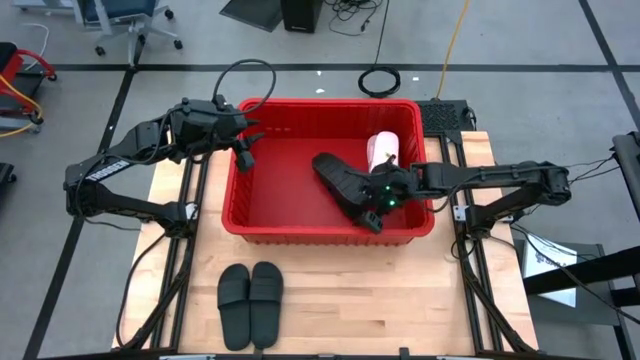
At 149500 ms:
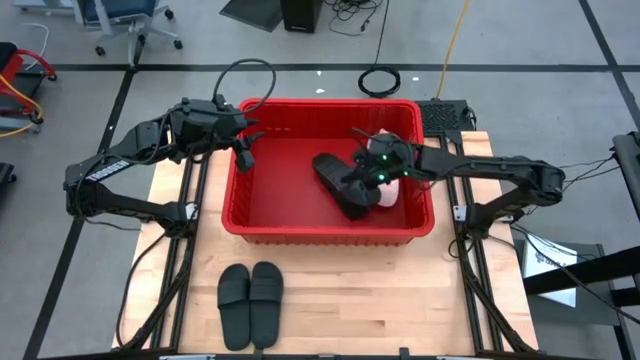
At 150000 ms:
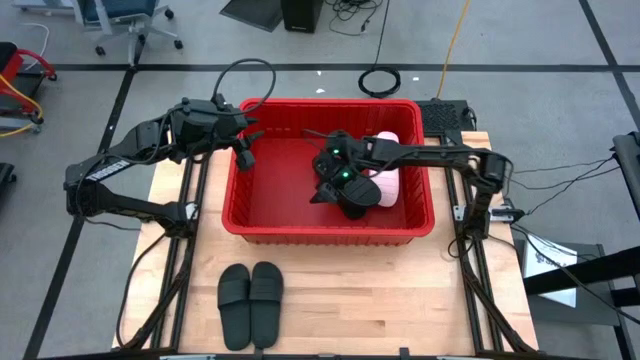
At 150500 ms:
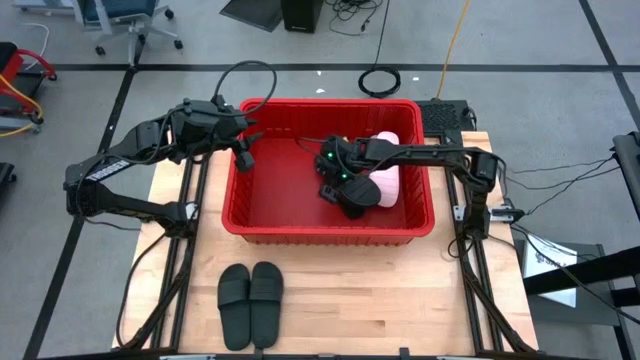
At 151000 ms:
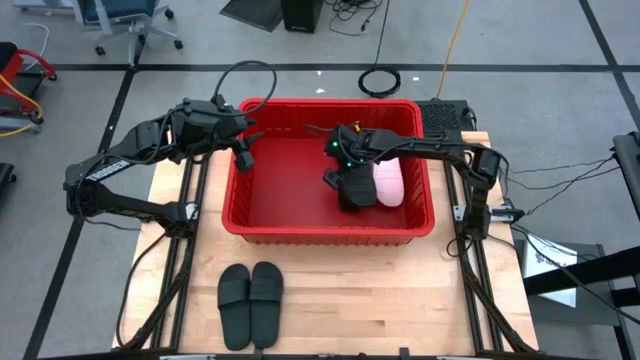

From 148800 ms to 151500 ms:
Task: Pick and place slides into bin
Adjust the stacked black slides in the red bin

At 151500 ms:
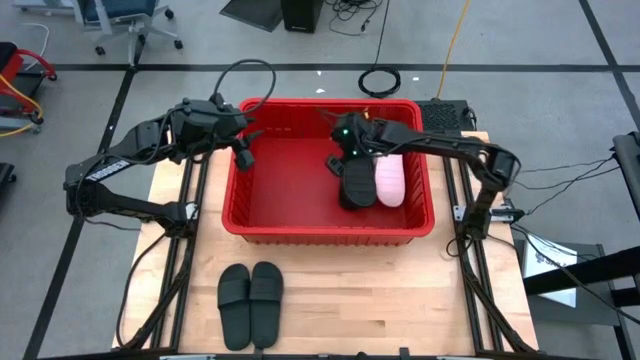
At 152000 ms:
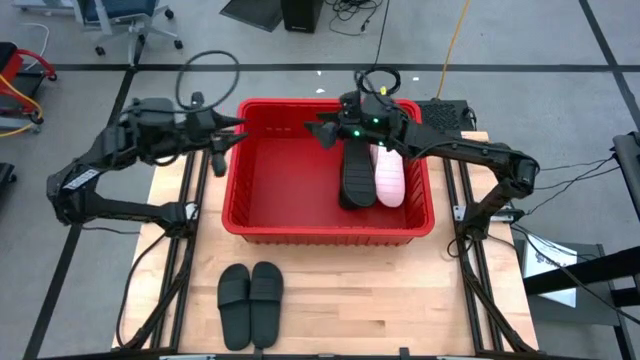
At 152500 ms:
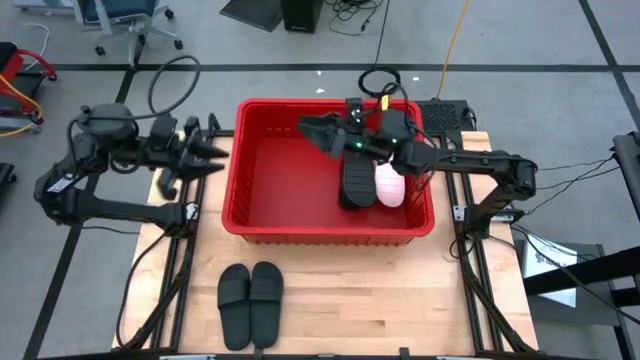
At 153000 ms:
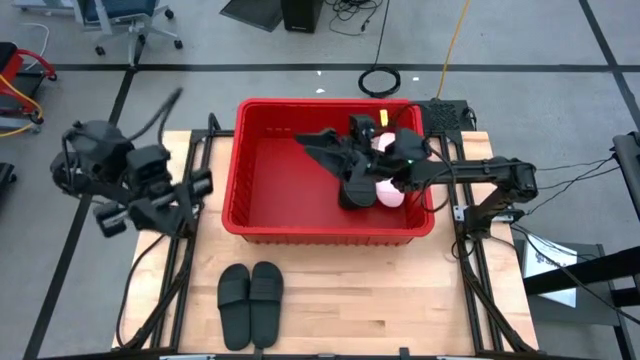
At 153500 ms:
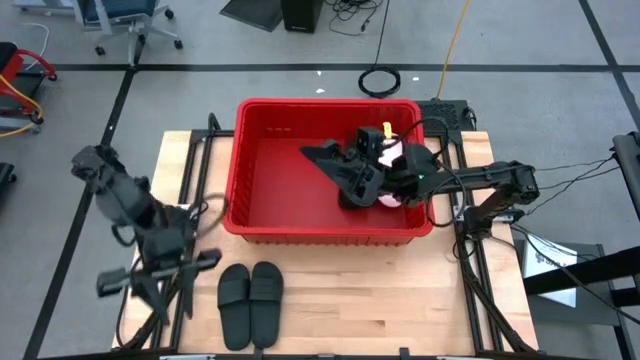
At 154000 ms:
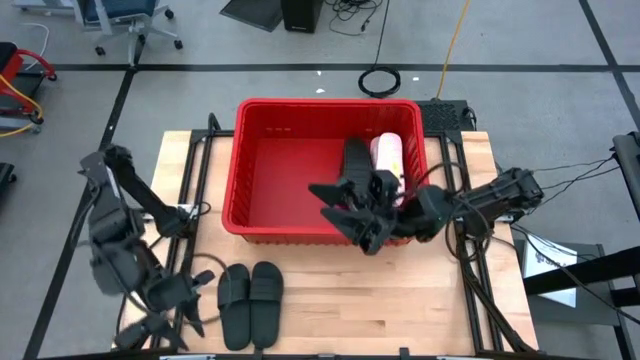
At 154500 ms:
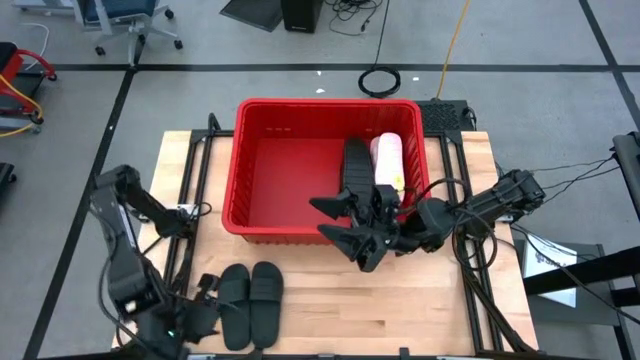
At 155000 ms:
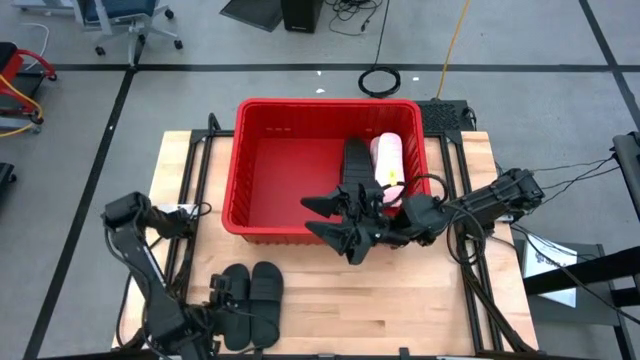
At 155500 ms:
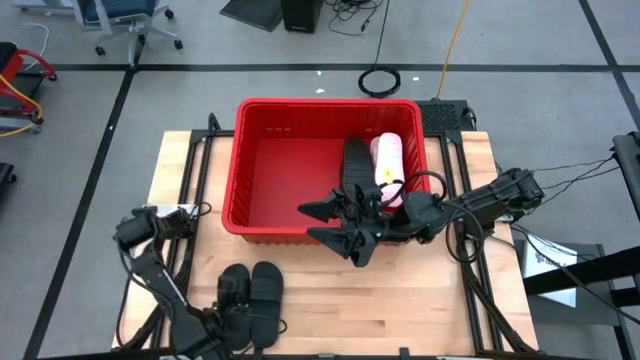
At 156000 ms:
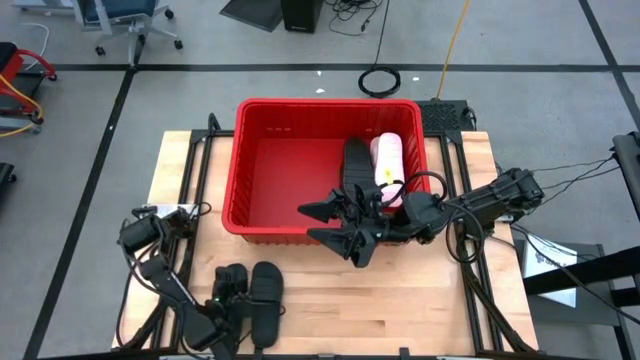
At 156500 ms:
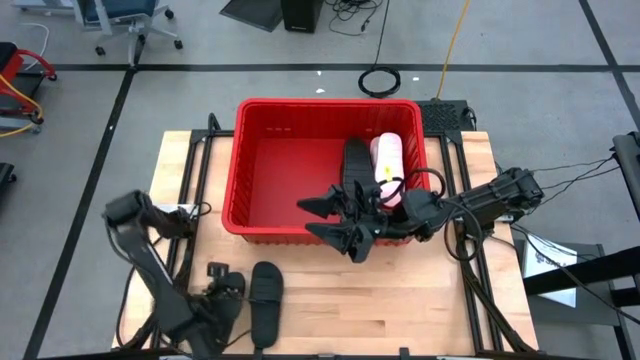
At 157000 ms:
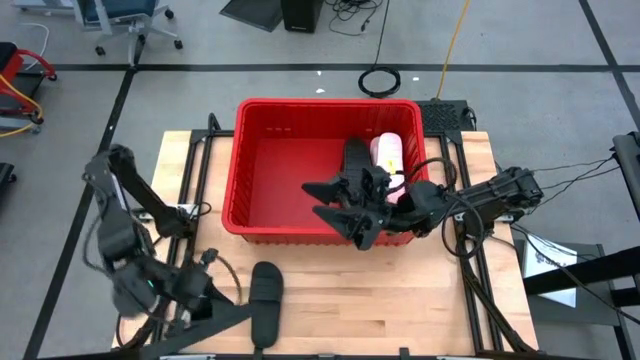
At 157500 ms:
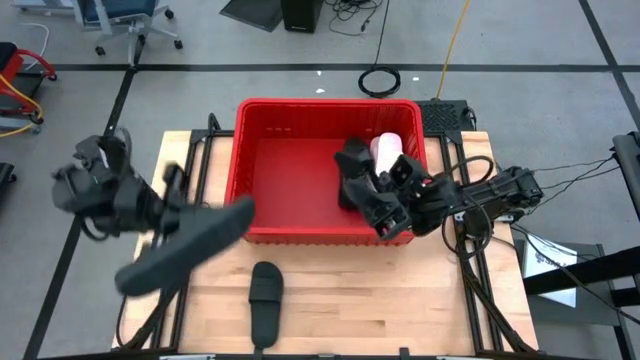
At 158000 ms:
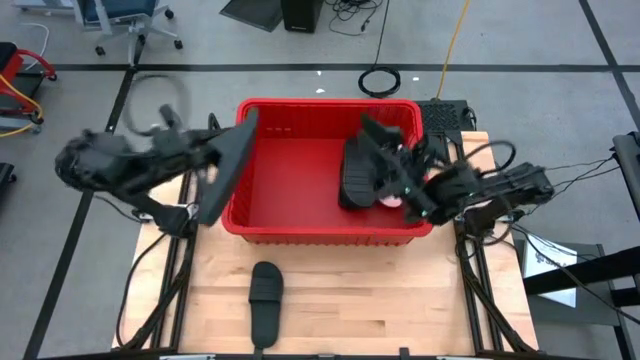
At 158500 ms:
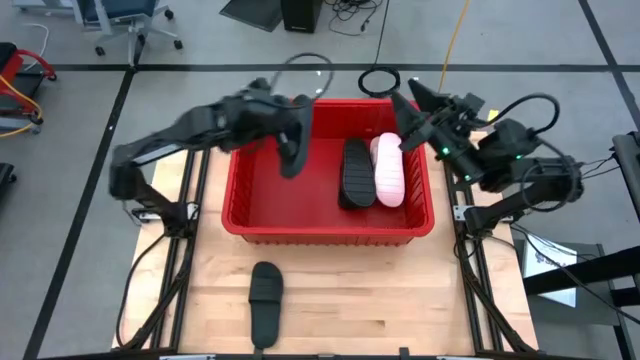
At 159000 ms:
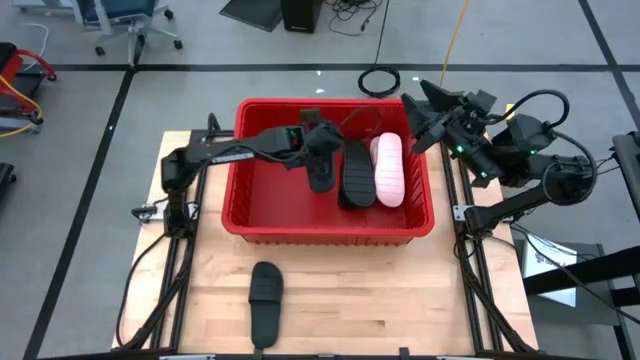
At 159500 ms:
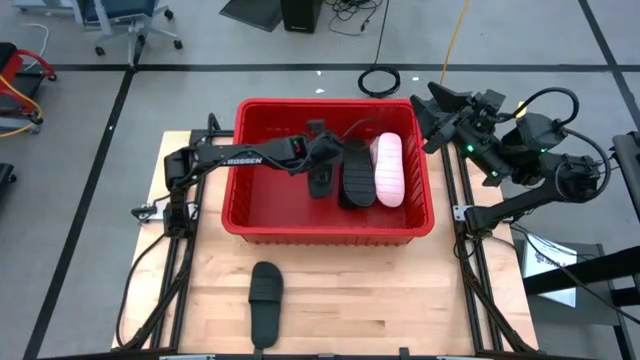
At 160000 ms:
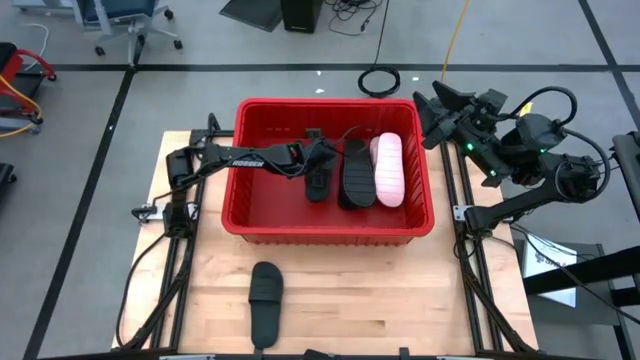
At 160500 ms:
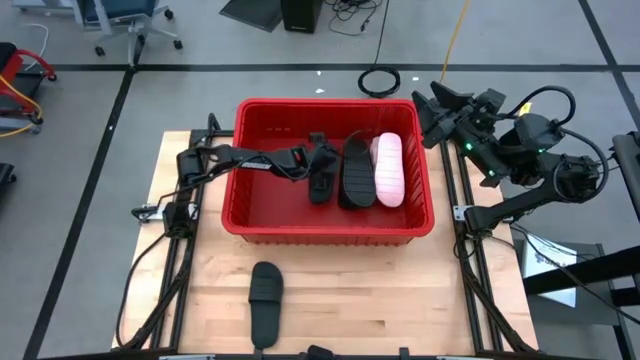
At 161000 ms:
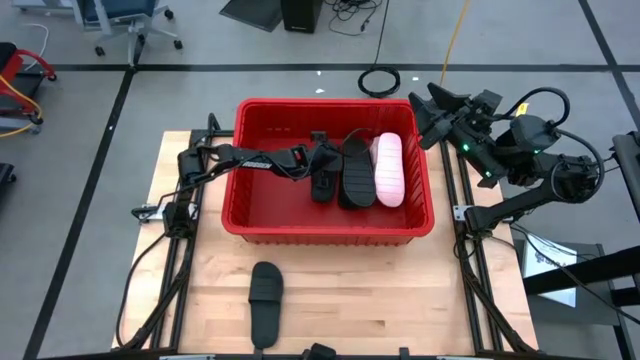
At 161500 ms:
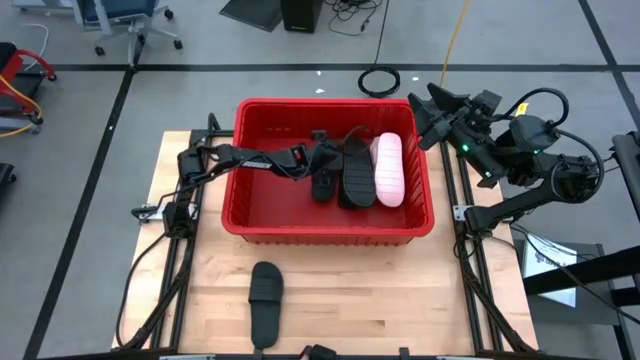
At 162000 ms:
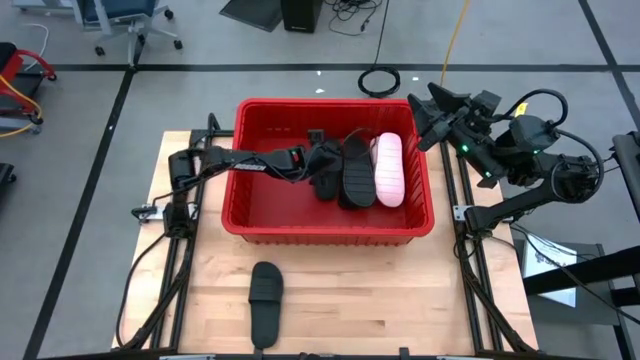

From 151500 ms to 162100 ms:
Put the black slide into the red bin

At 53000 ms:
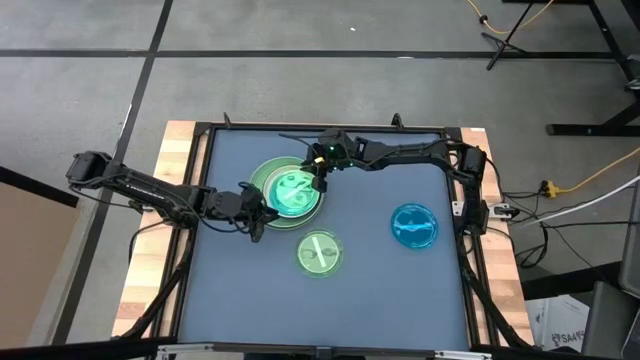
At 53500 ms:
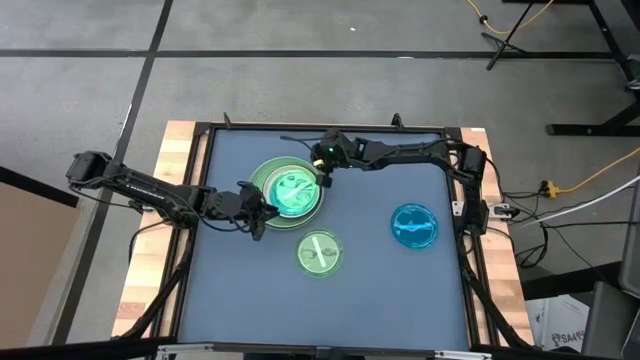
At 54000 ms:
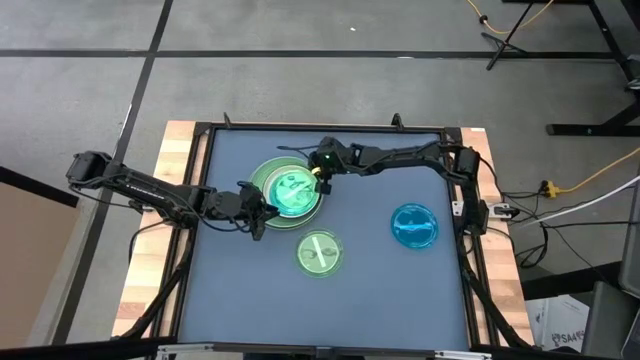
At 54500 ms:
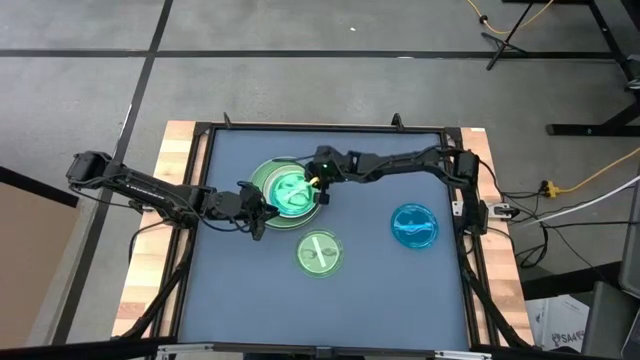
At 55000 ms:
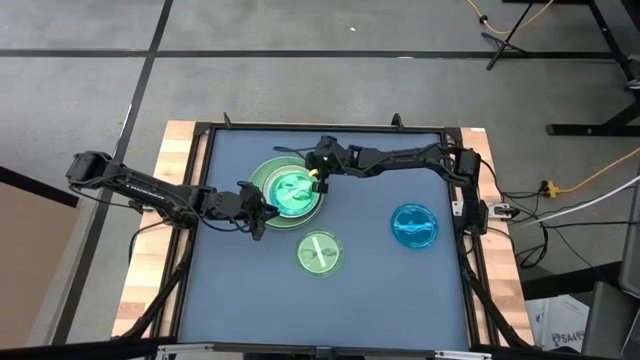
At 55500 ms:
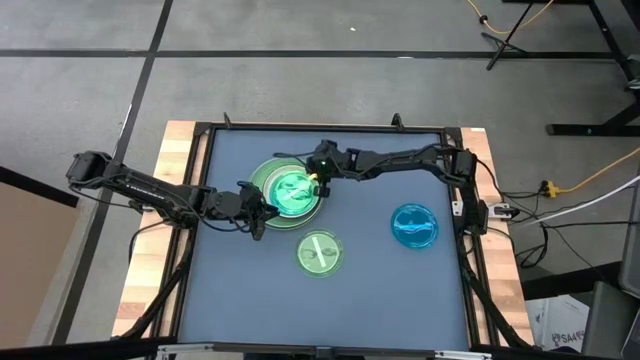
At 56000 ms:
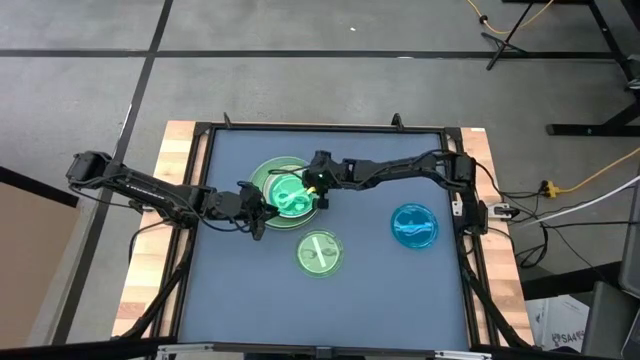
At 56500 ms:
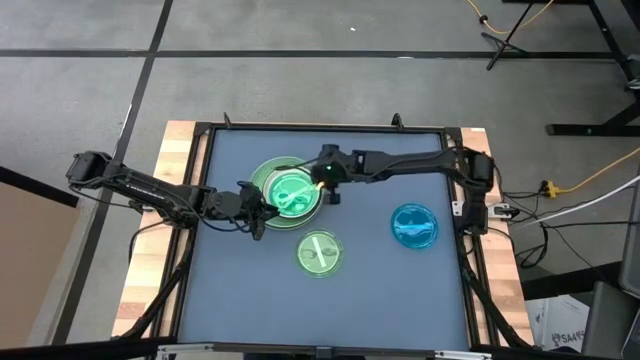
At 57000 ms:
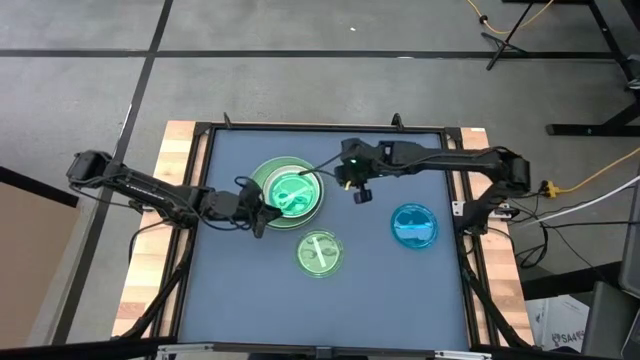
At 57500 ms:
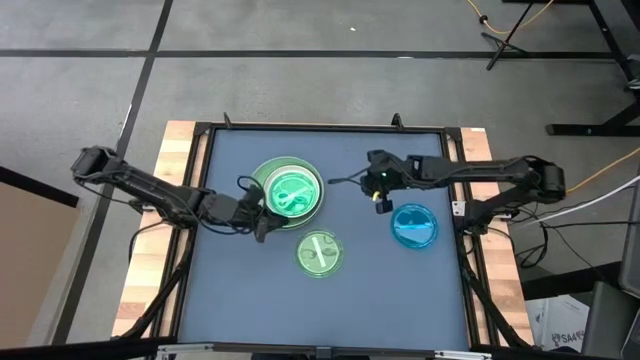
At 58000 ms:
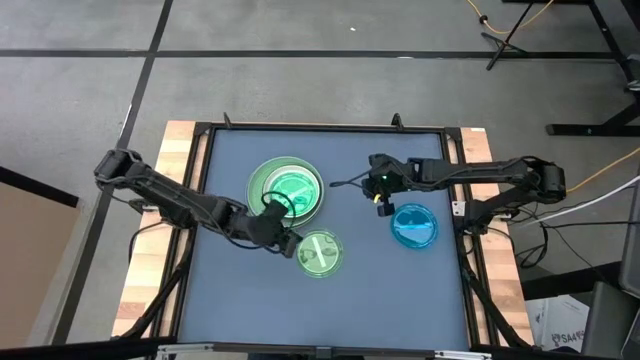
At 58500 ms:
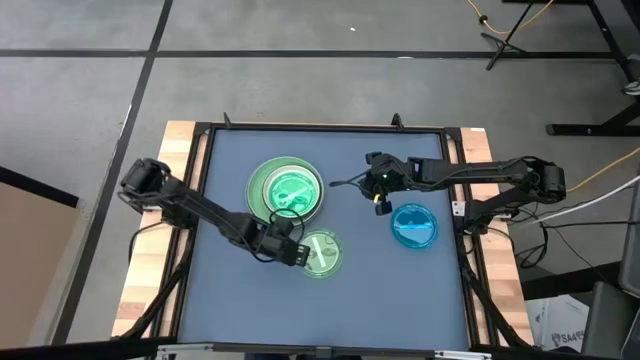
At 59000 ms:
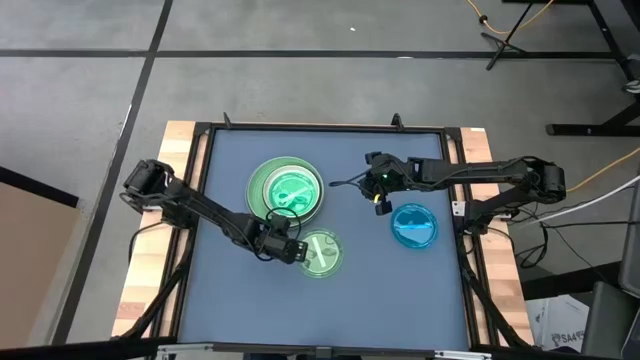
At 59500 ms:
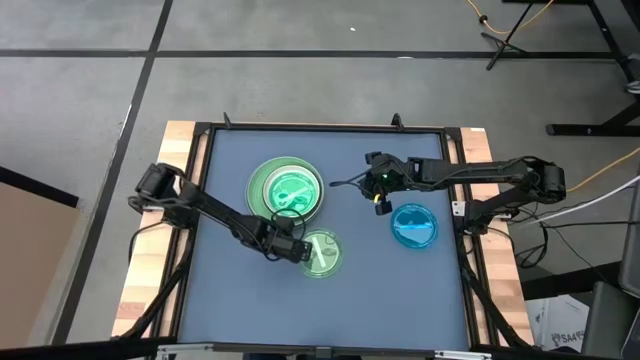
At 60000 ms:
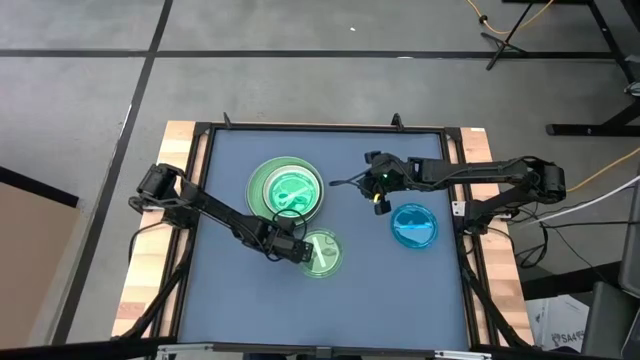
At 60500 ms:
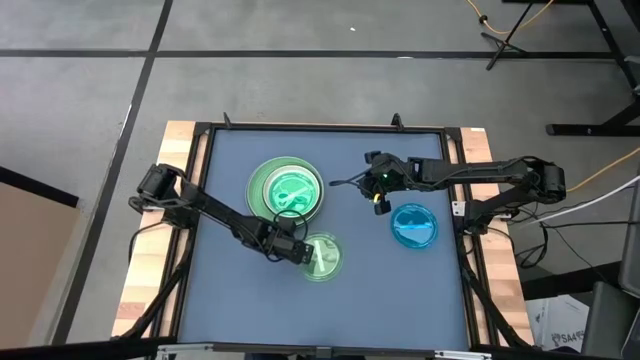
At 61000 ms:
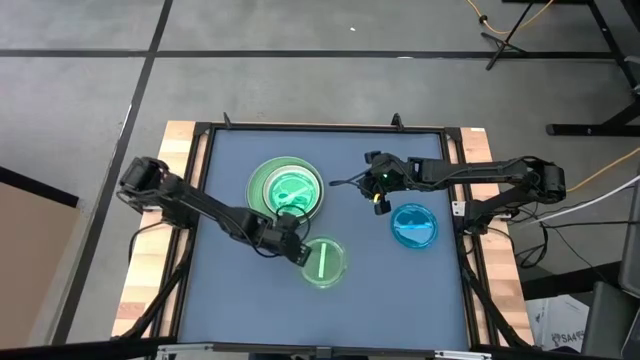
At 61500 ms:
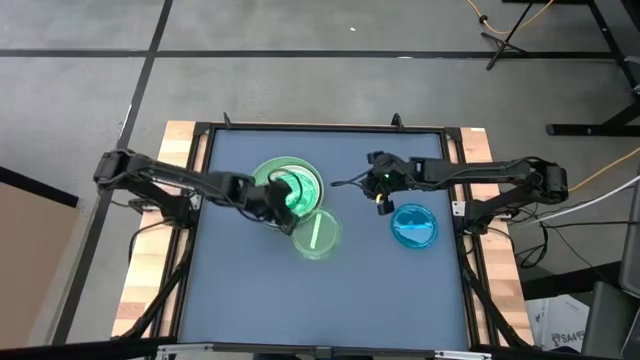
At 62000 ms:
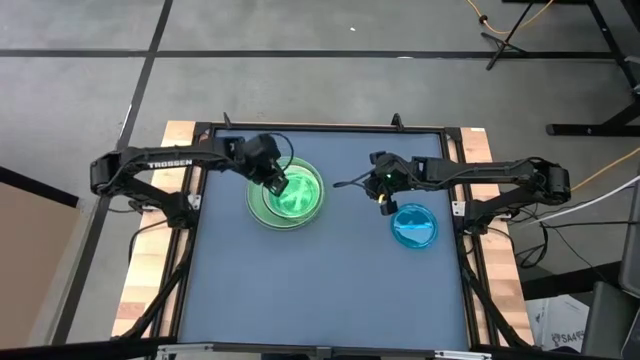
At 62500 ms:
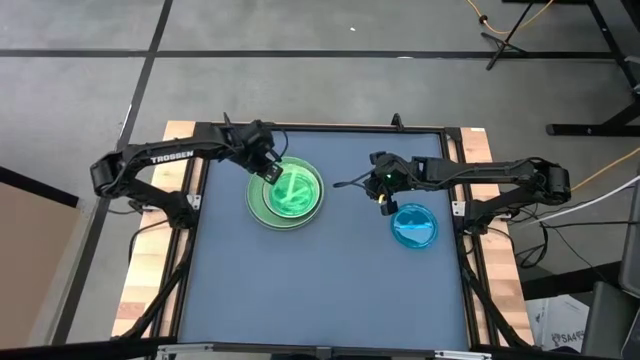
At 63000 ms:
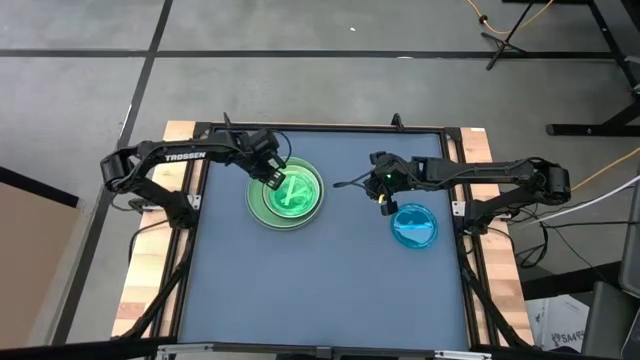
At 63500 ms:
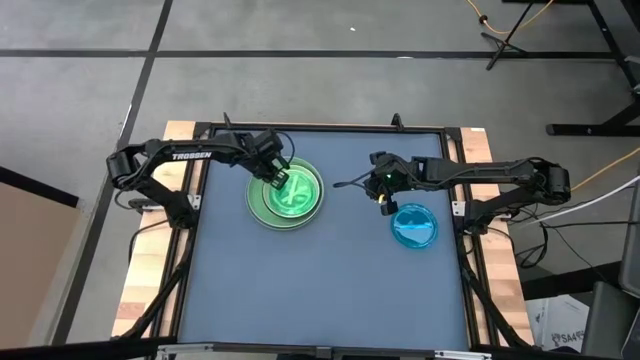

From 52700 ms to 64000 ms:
Task: Stack plastic plates
Stack the transparent green plate on top of the transparent green plate
